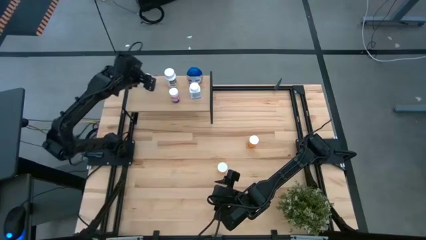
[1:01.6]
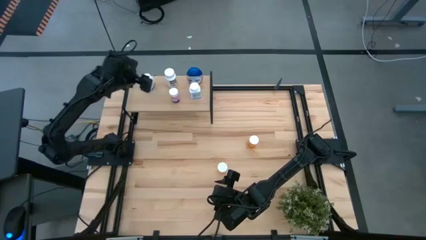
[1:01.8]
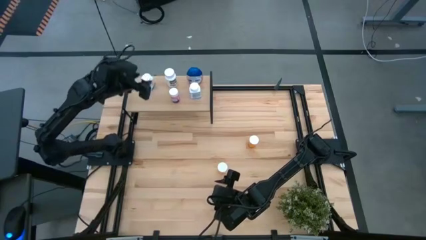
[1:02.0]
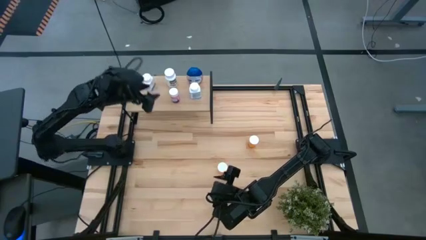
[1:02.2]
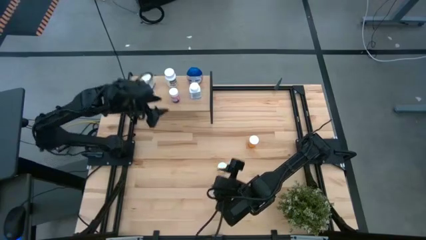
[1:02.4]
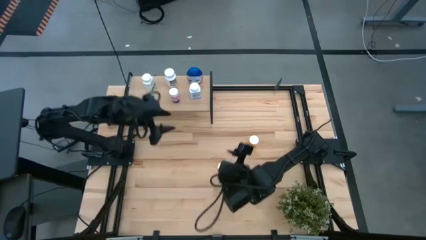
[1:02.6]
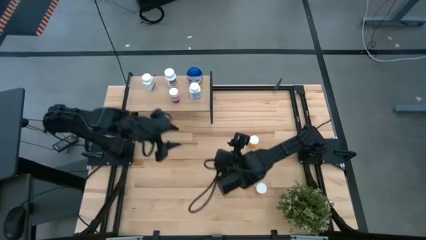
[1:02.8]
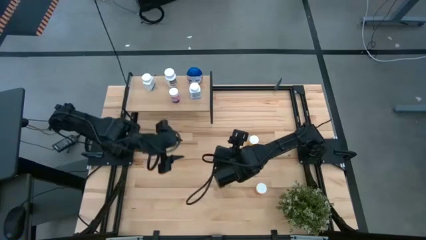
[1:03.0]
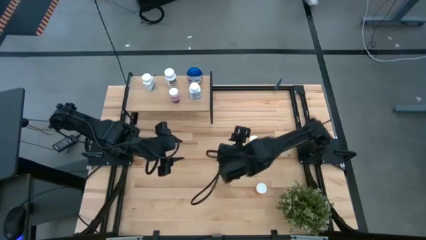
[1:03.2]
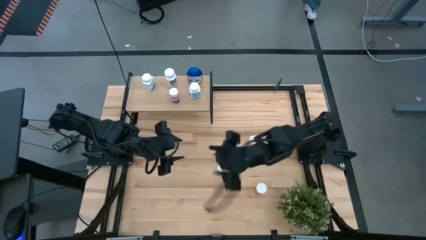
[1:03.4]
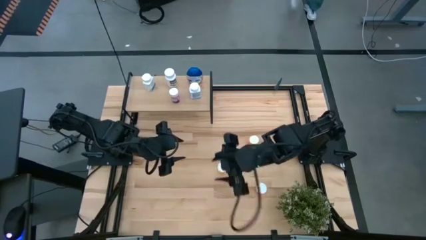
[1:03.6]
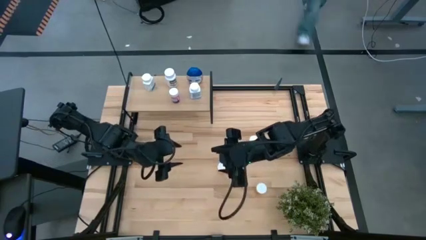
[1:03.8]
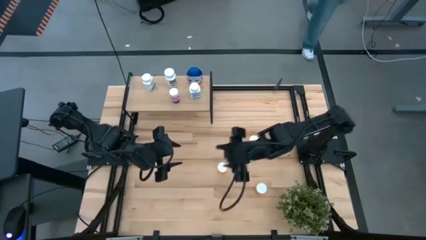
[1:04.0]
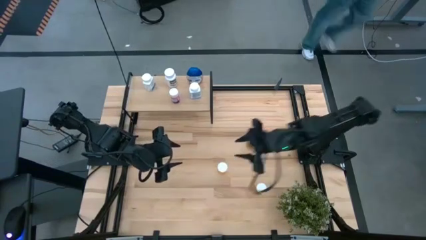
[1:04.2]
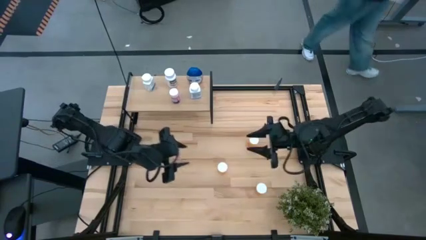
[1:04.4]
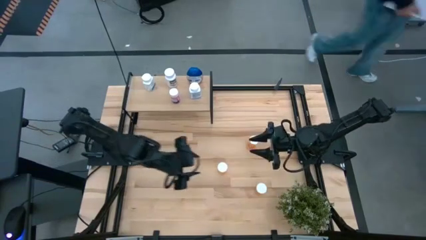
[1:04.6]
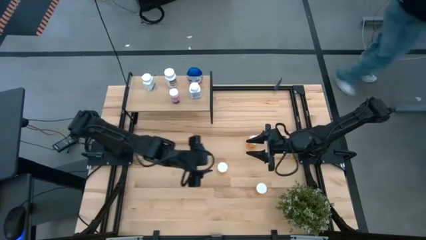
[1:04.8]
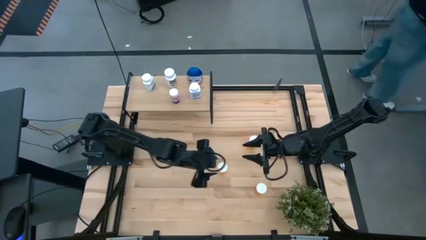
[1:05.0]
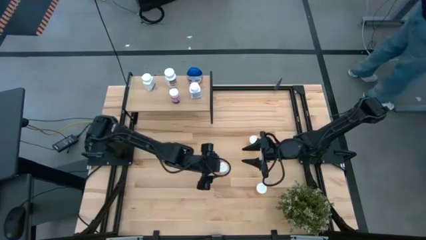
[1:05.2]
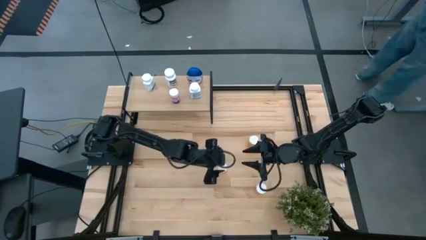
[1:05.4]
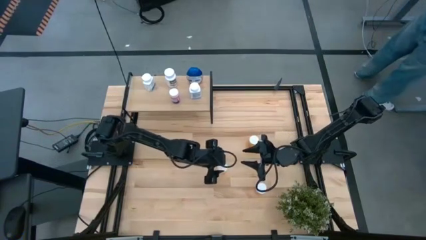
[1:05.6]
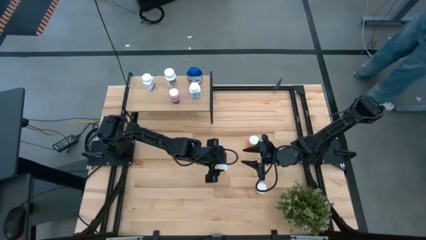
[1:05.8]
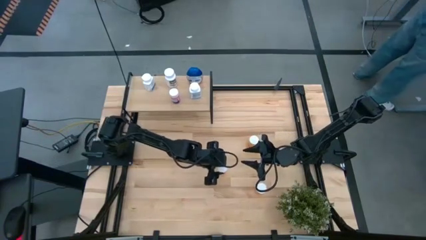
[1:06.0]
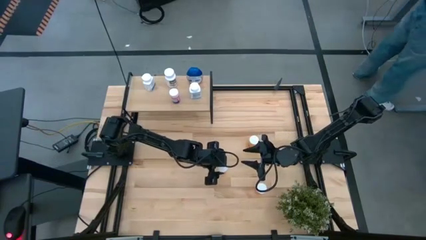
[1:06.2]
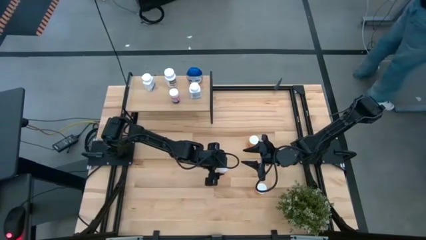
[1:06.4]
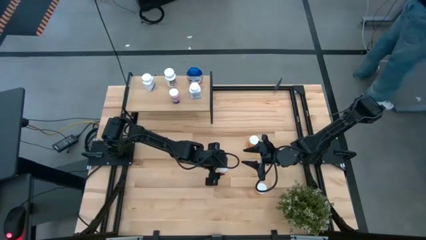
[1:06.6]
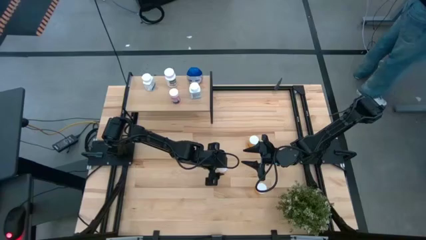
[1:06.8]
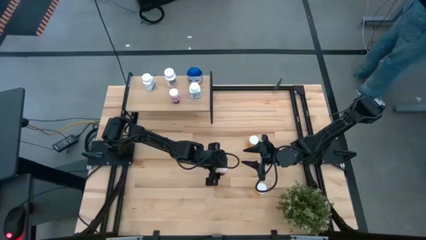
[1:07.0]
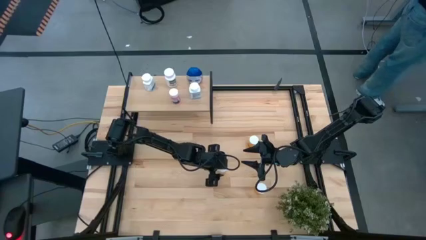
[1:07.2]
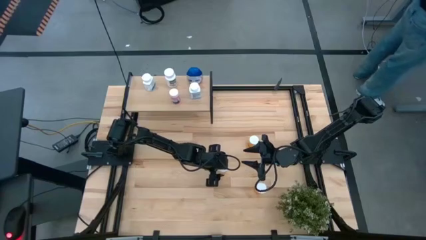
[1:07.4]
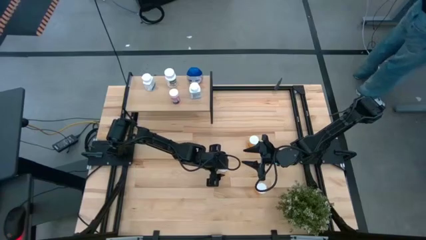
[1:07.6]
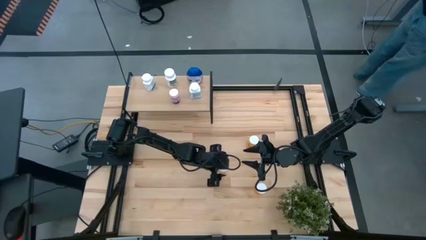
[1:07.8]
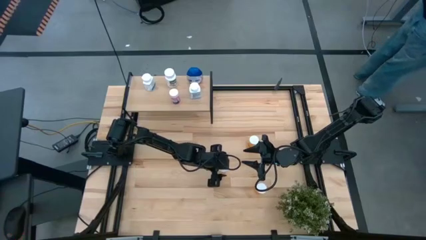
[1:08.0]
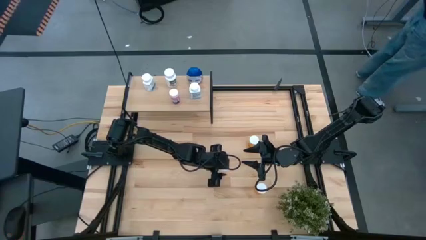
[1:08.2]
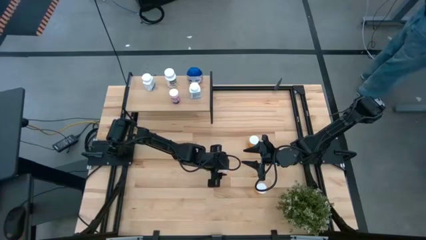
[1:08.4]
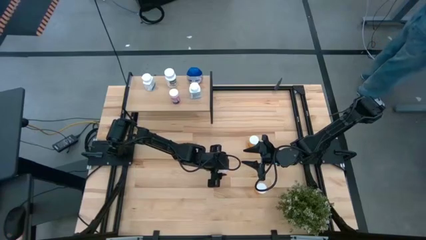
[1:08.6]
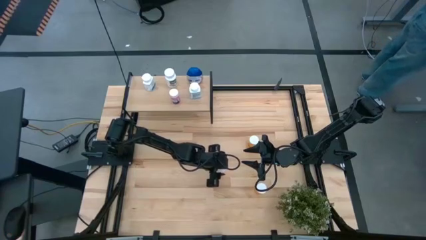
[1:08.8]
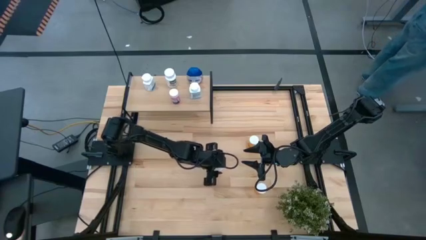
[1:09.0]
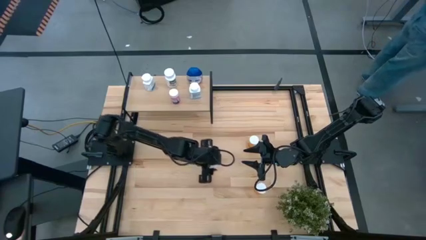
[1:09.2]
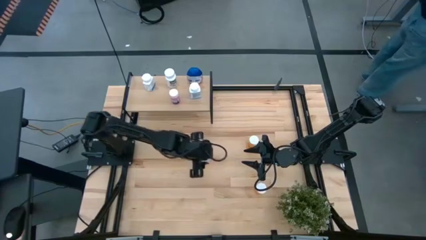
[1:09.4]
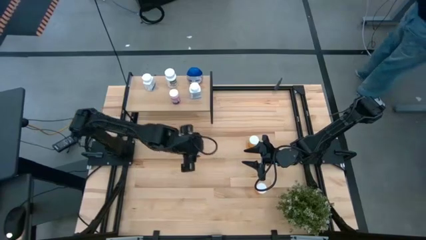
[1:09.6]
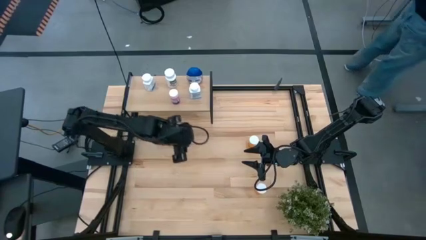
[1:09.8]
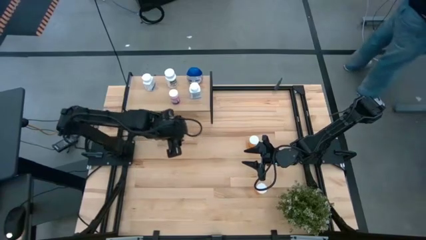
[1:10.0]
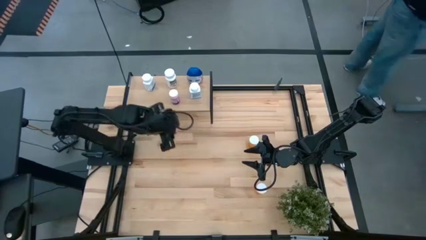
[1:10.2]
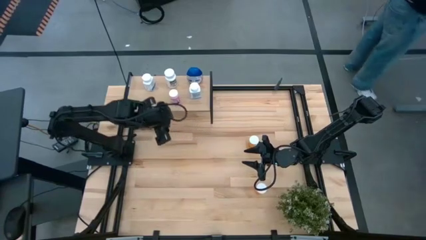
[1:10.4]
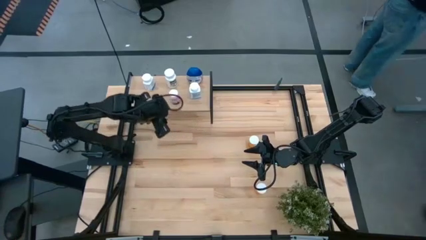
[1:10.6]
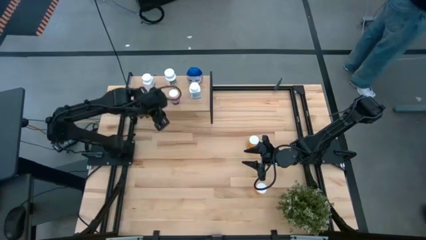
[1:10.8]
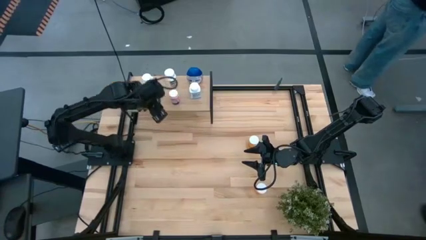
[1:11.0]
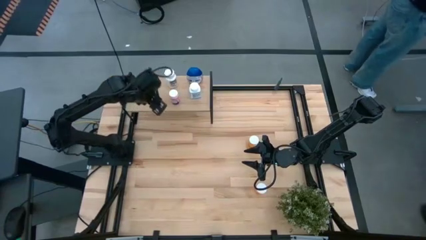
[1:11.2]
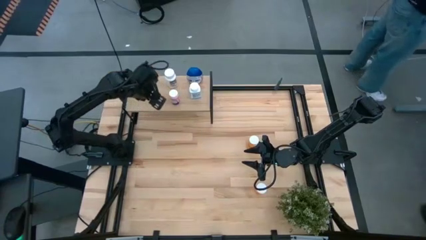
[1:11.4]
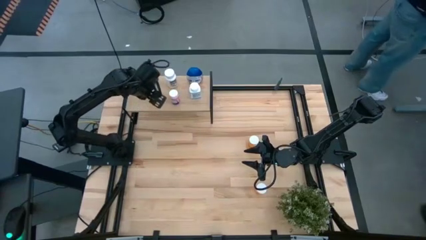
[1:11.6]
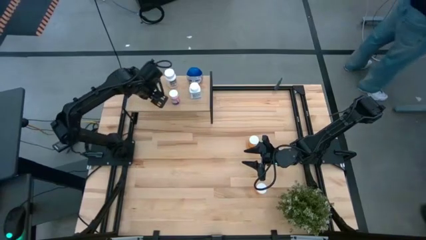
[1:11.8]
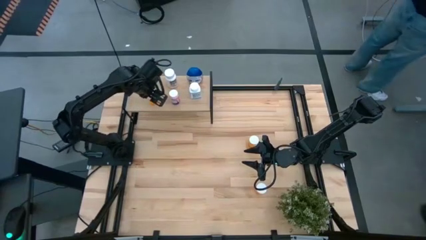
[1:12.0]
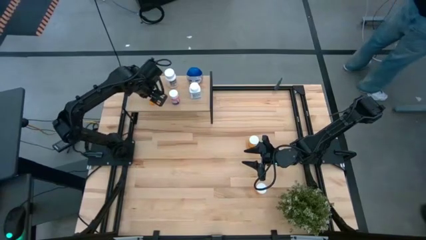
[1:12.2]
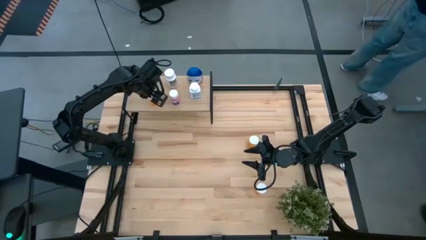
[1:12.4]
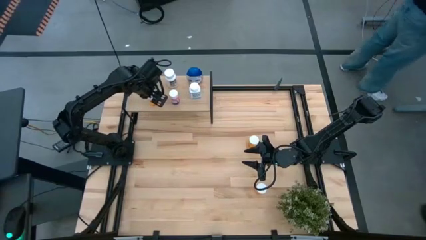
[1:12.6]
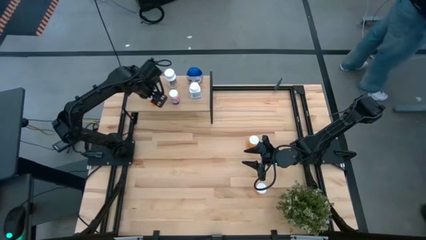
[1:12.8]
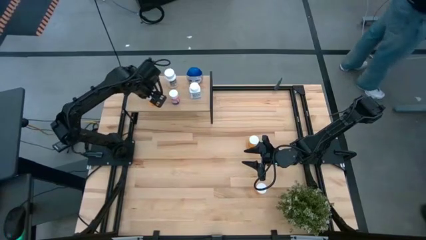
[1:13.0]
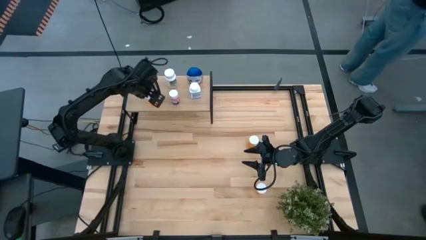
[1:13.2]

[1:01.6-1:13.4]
Task: Pick and place medicine bottles onto shelf by color
Put the center orange pill bottle on the shelf

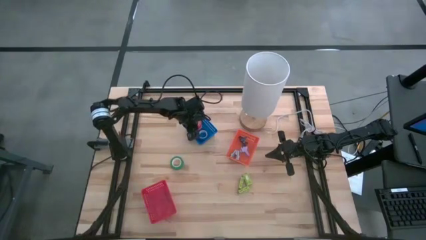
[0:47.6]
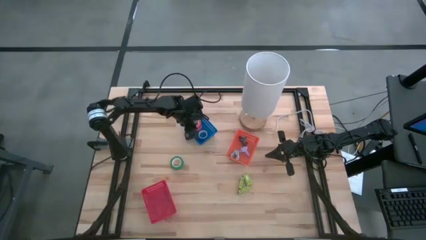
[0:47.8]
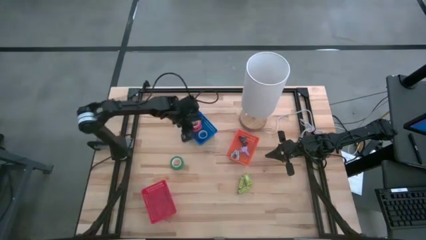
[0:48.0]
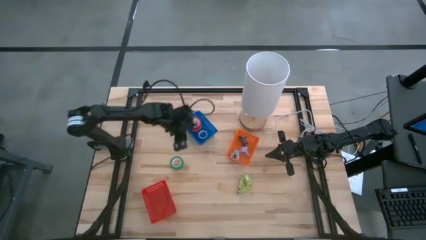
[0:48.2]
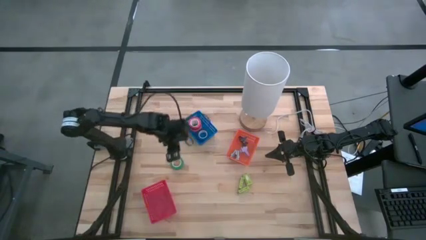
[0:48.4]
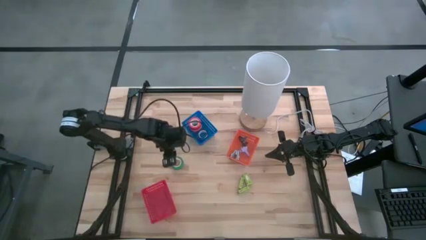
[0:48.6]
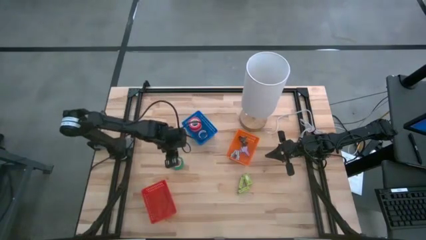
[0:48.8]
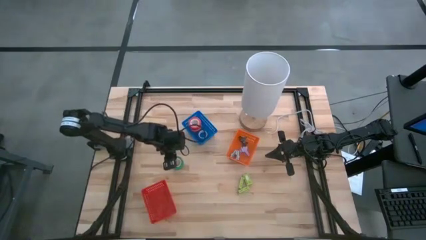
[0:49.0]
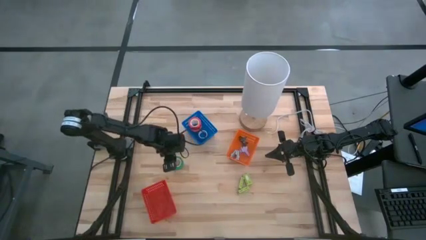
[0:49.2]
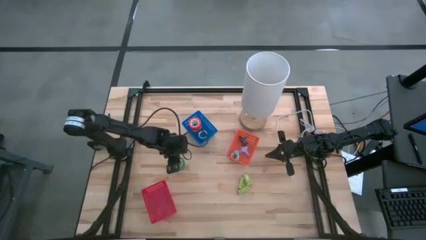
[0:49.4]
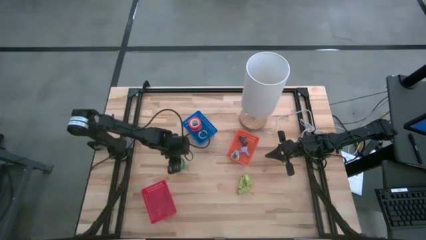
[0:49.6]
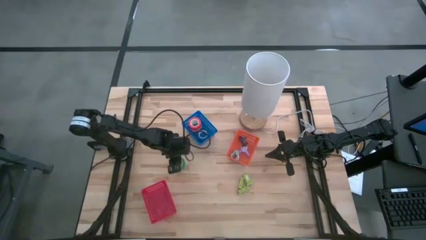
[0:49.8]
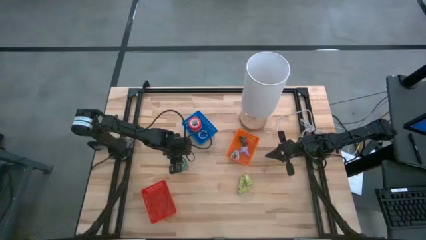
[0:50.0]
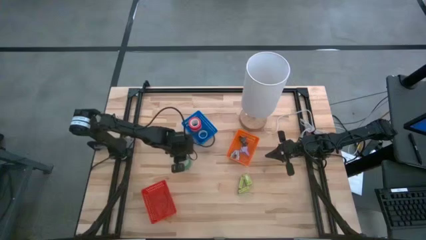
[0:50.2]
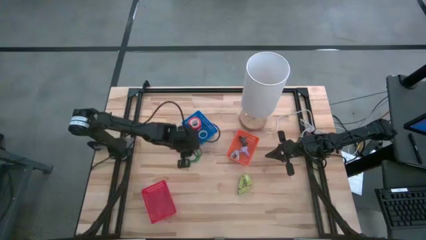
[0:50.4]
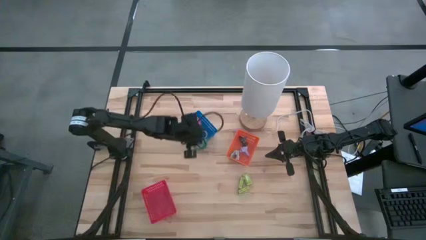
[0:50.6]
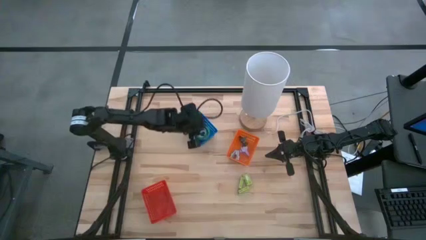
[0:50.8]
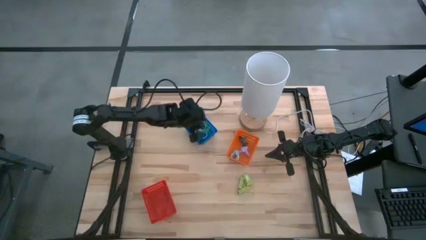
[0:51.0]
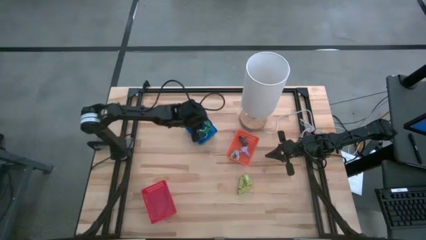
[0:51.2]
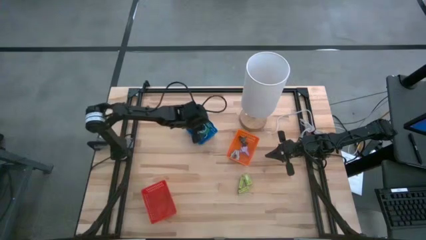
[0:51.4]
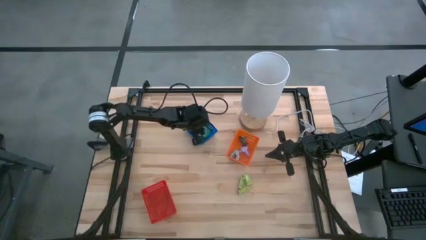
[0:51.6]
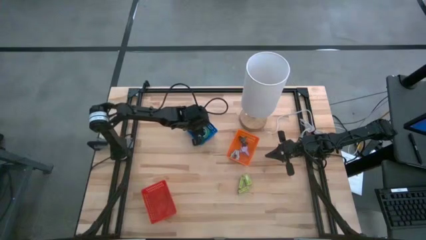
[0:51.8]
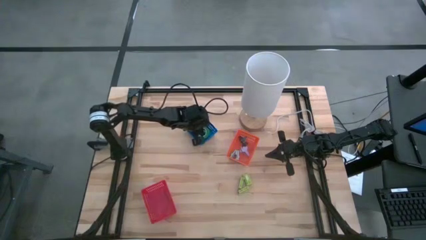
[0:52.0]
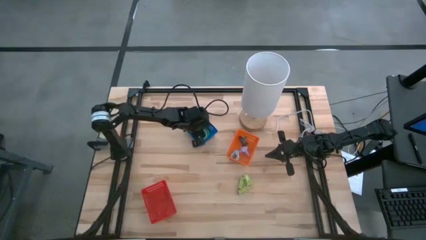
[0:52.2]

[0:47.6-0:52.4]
Task: Pick and place Stapler, Stapler remover, tape
Put the green tape into the blue basket
